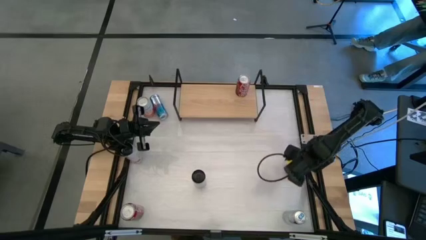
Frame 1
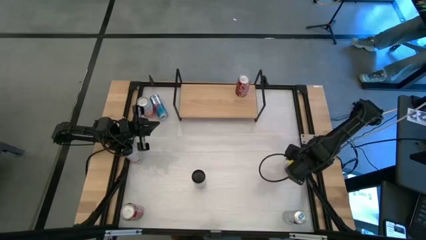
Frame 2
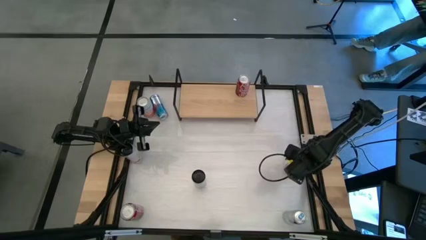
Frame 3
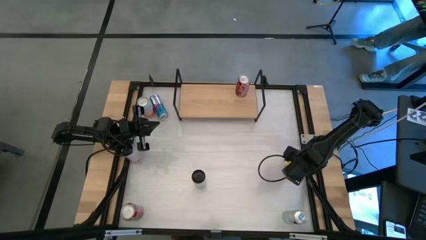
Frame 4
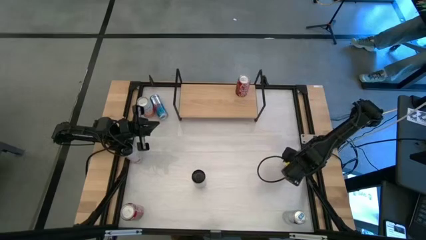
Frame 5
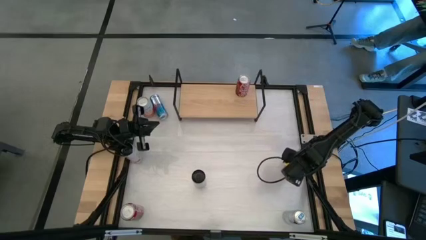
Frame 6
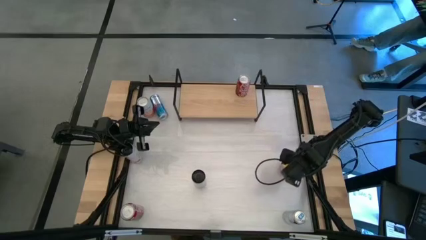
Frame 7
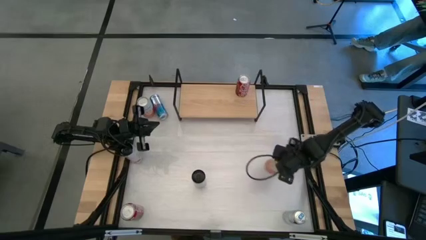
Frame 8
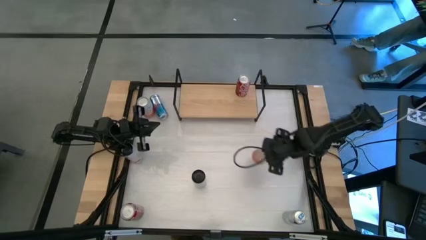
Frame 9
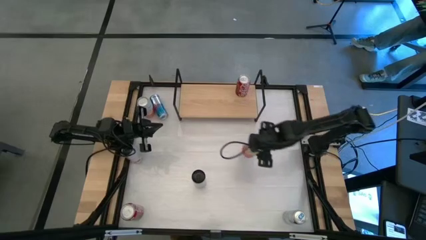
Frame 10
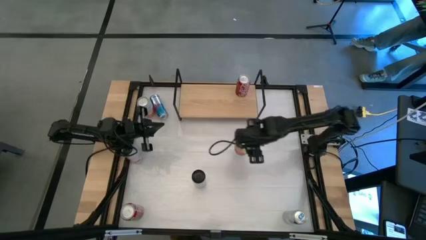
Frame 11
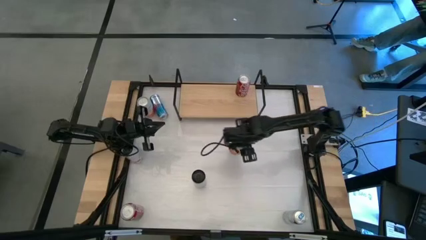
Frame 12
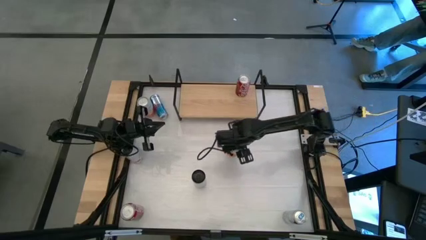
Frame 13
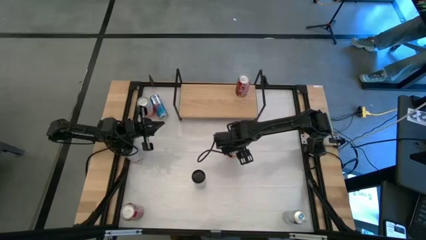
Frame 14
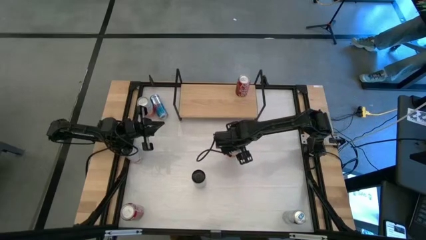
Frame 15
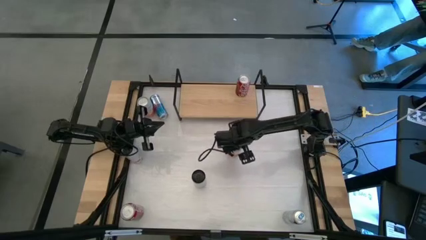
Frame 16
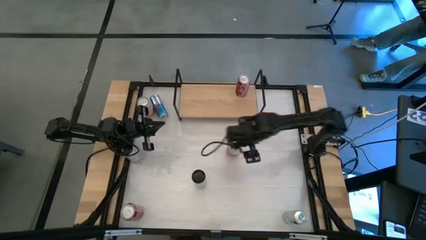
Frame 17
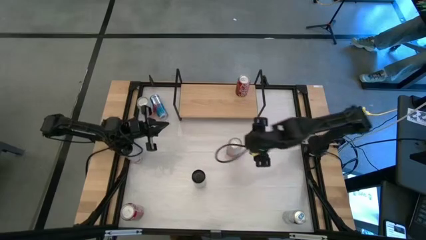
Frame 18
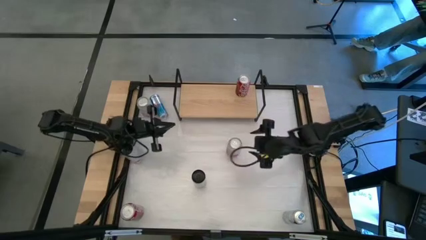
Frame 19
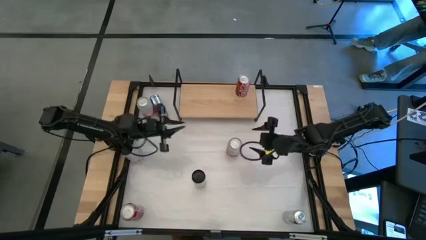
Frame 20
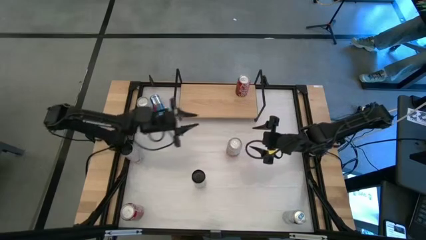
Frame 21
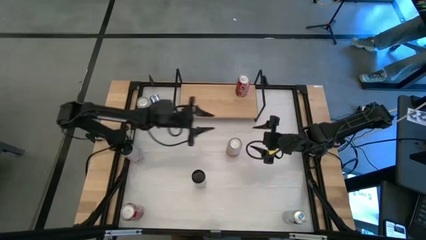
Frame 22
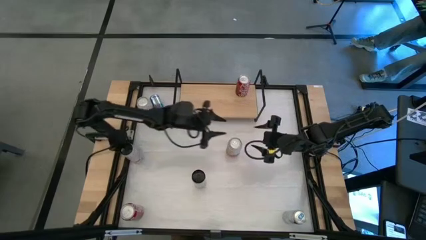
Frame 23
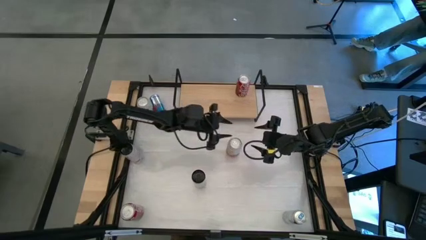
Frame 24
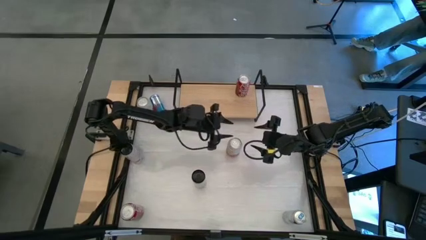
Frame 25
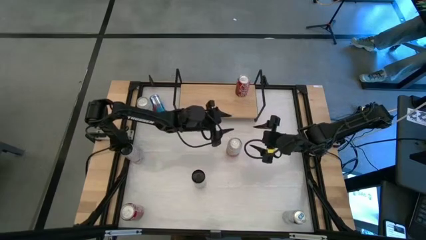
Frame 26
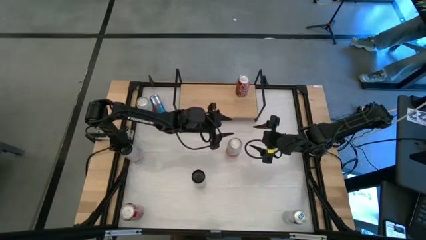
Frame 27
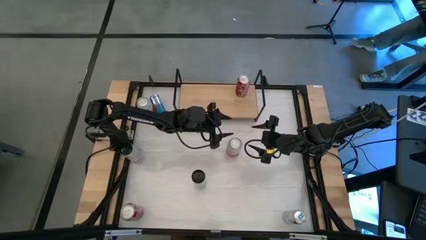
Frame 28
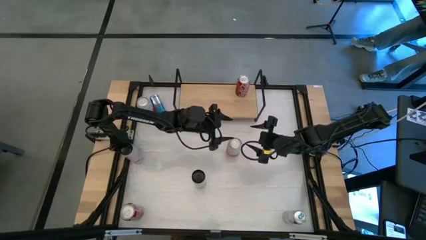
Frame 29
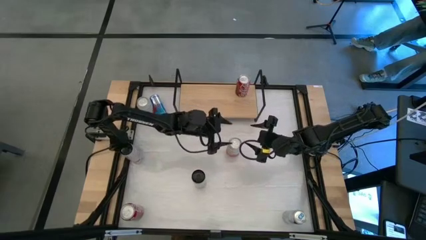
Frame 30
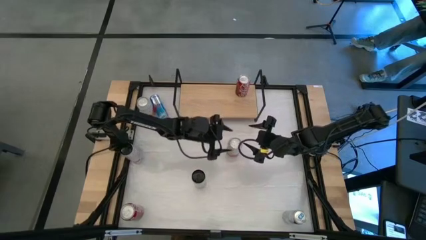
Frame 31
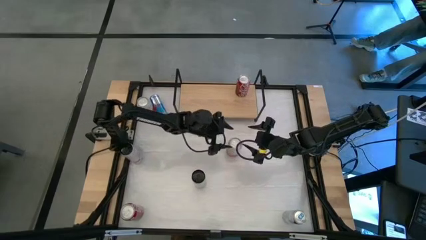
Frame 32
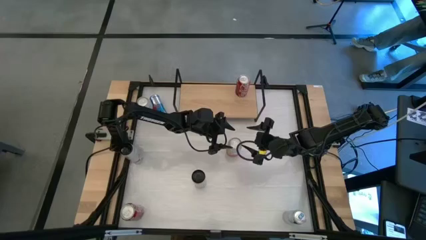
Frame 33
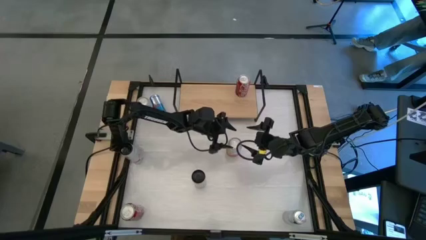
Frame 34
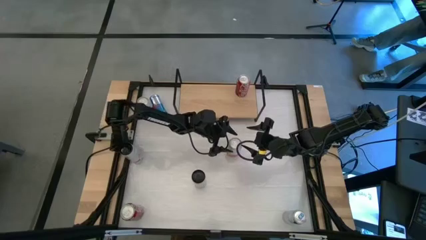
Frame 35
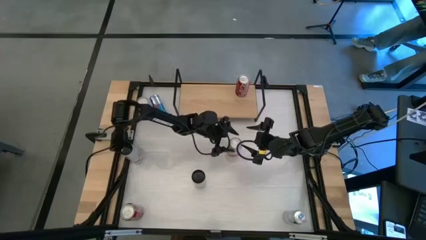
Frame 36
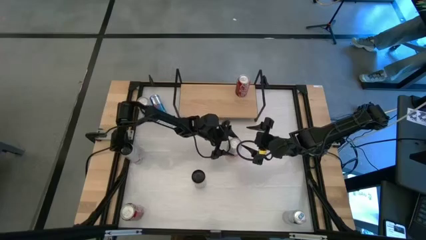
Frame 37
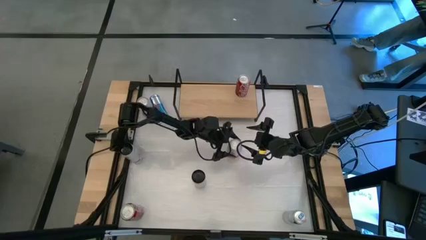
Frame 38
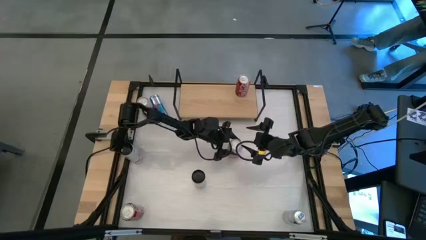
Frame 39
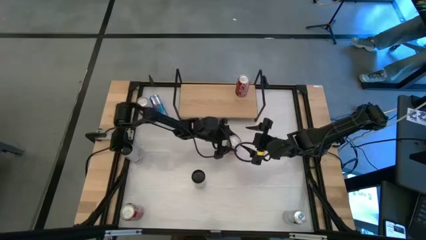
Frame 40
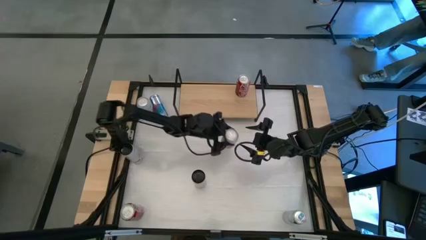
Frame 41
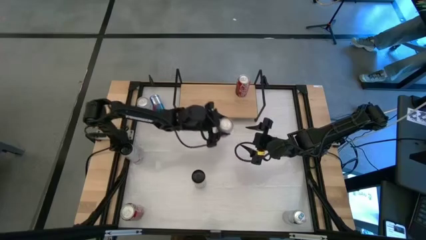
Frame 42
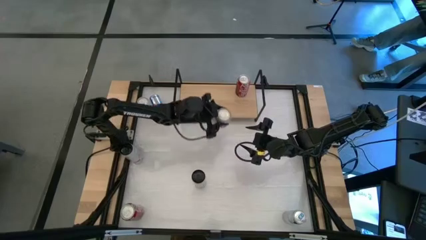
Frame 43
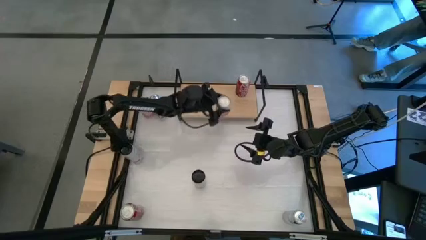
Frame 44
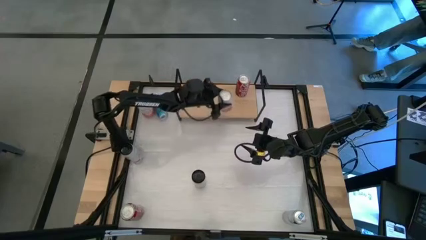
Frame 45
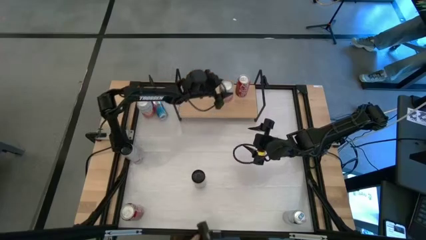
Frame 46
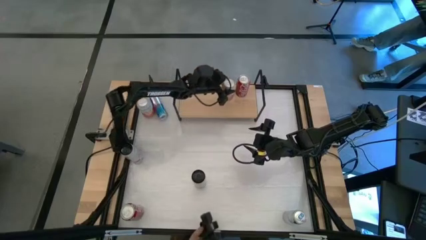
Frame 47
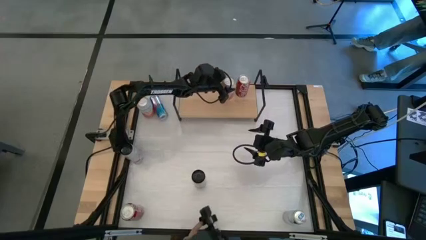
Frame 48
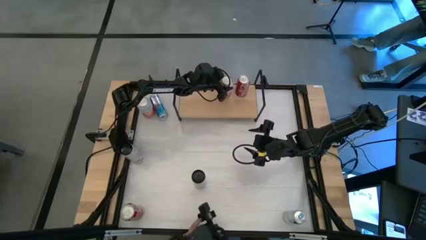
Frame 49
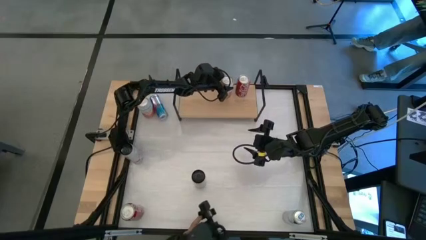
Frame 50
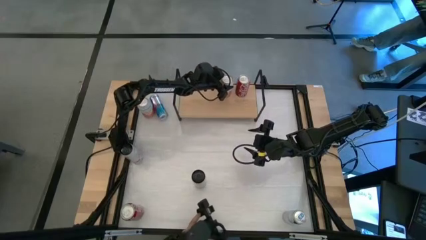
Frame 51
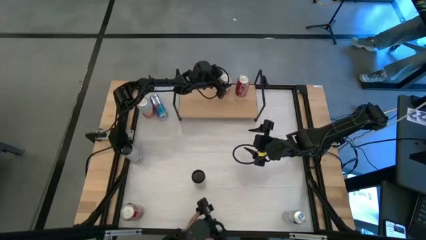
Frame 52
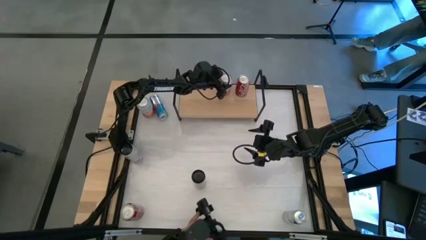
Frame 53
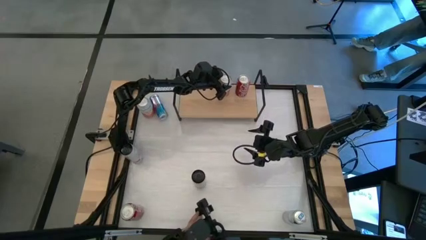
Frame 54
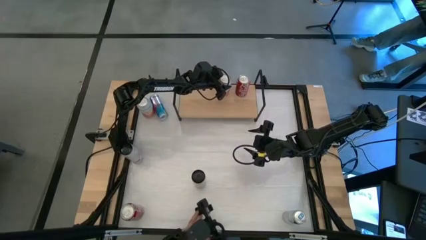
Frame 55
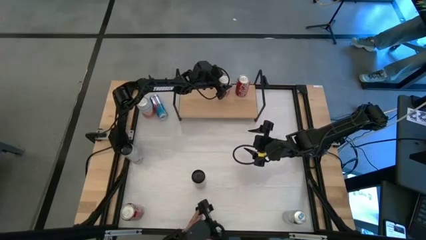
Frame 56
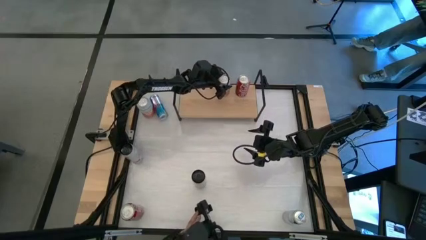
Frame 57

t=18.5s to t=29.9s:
Task: Place canned beverage on shelf
Put the left pink soda can on the shelf

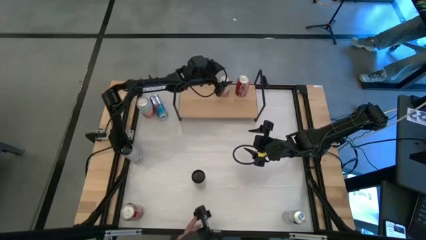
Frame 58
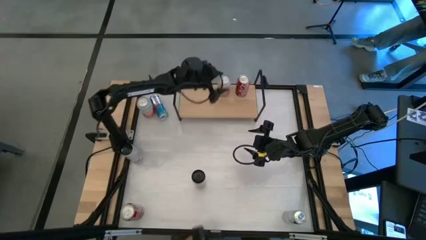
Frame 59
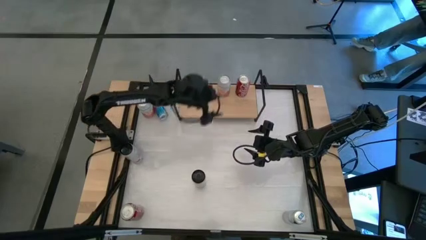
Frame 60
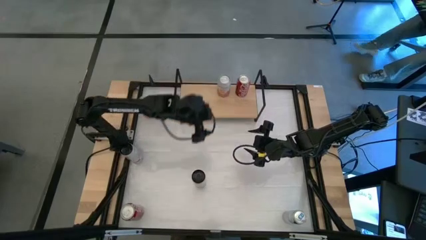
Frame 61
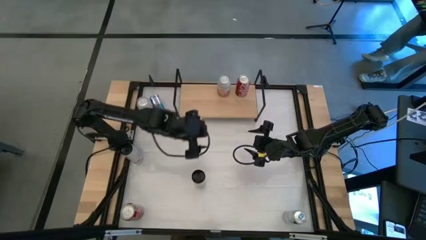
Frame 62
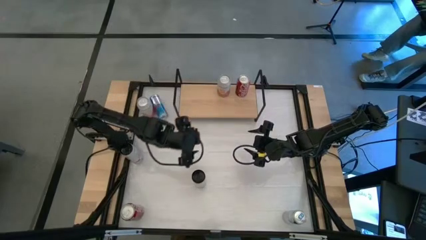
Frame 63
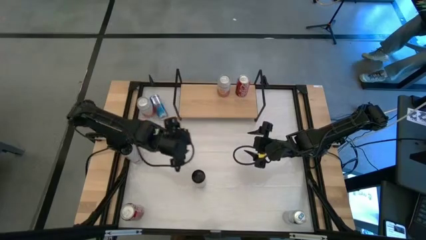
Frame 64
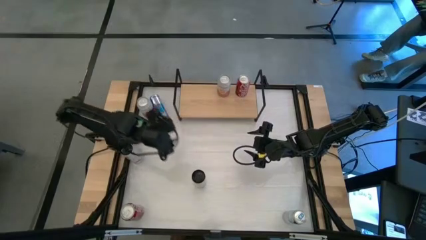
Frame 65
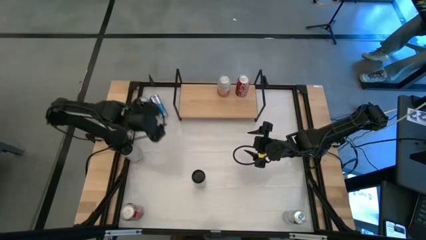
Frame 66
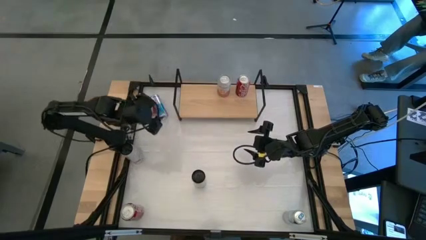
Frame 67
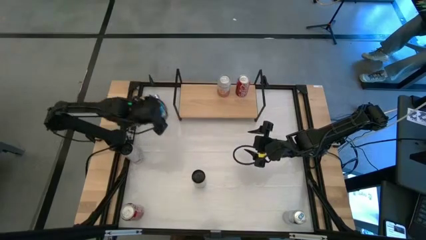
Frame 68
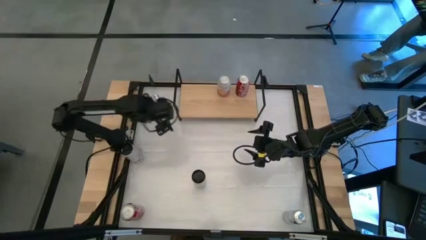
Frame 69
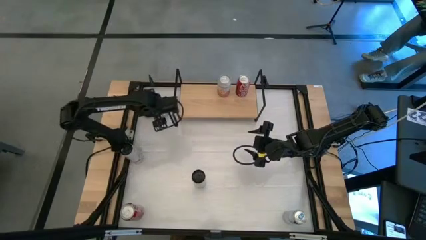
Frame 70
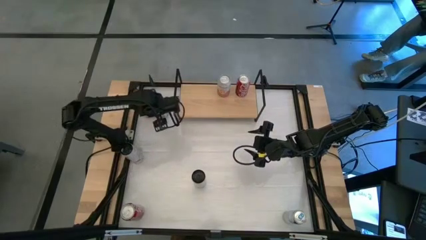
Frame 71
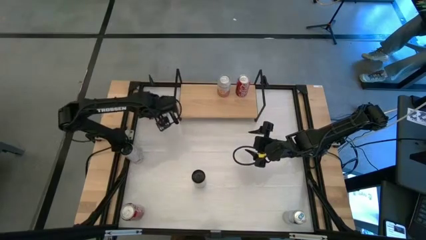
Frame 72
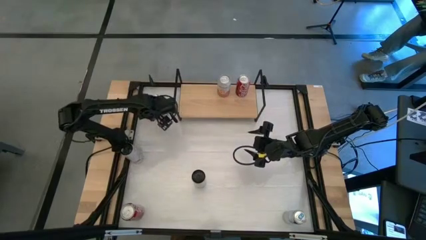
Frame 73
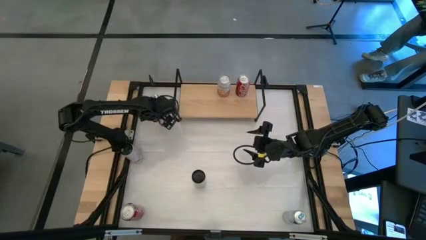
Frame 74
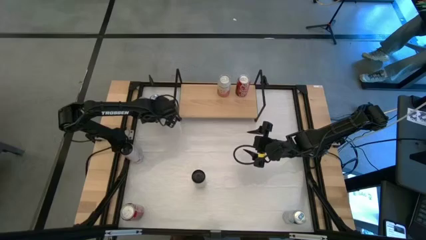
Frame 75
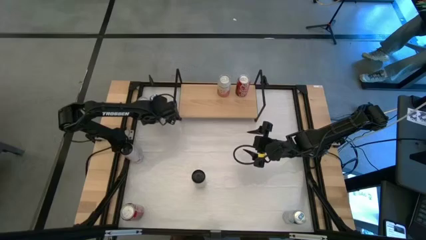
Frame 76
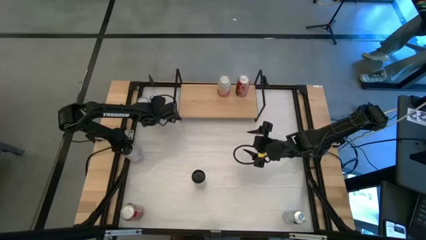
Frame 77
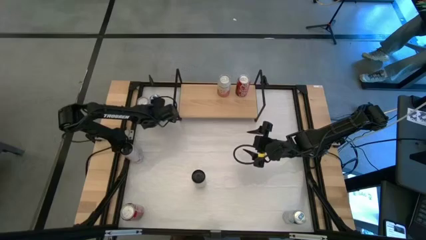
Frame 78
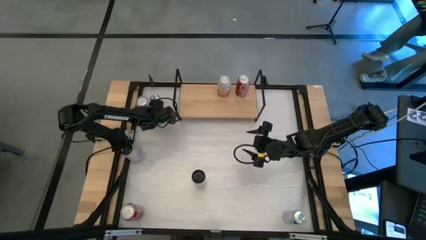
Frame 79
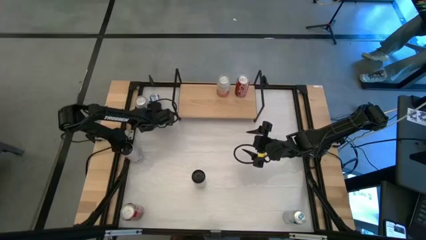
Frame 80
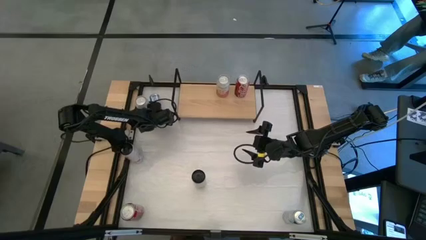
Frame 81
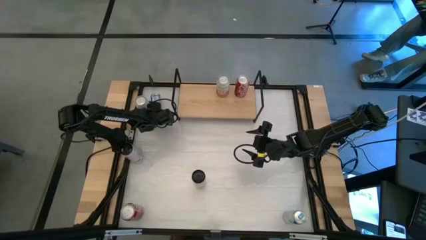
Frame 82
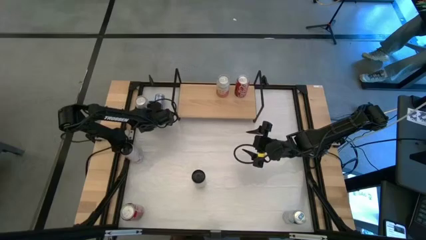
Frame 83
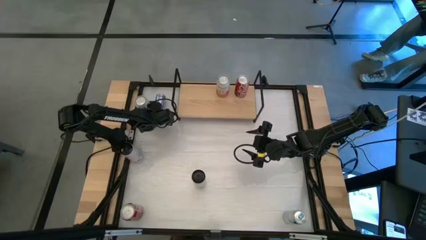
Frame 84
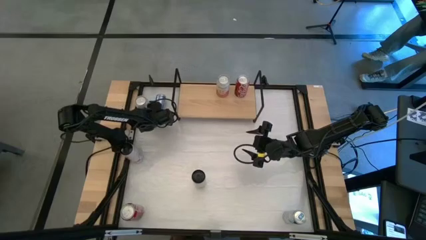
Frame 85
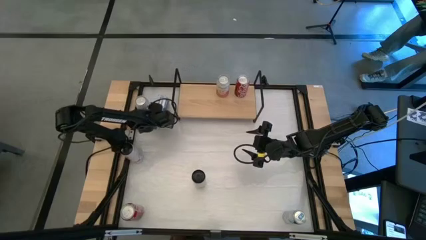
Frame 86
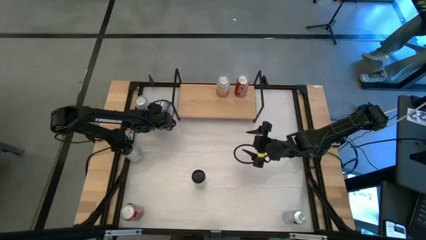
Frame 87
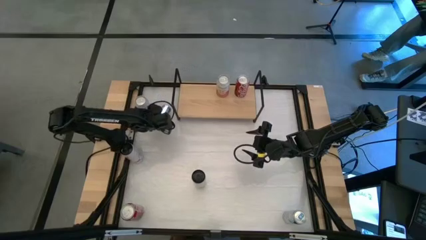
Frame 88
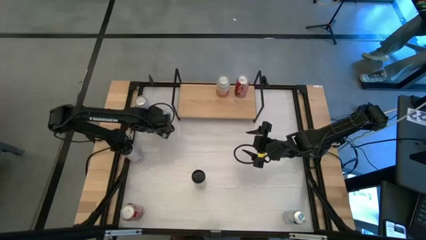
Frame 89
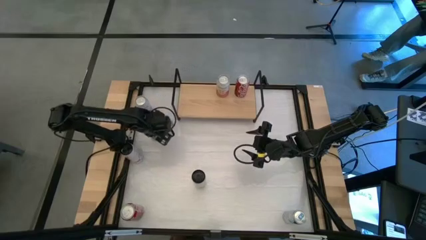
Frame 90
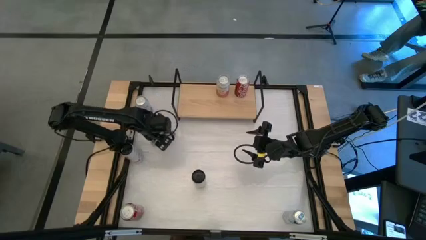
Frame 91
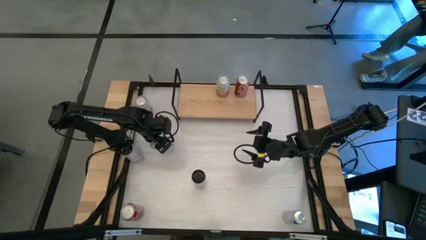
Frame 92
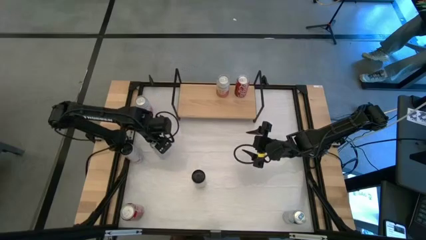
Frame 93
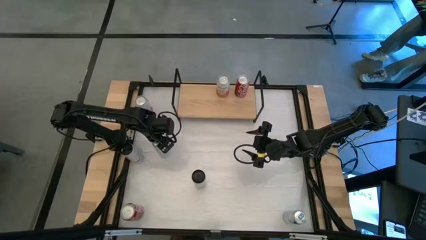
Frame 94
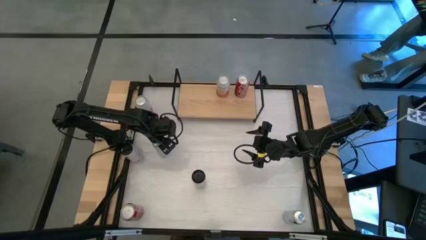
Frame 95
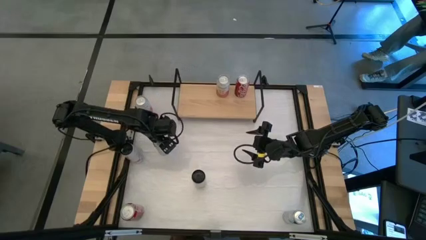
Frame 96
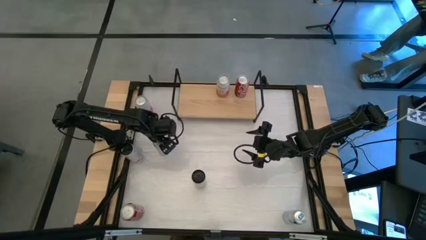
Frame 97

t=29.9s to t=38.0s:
Adjust the top blue soda can
